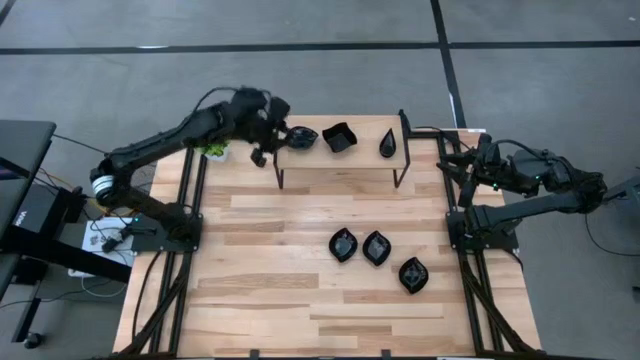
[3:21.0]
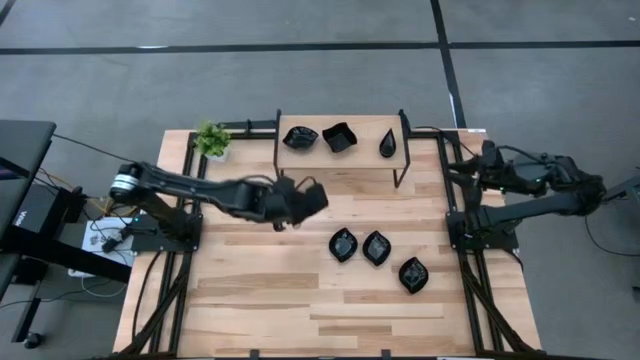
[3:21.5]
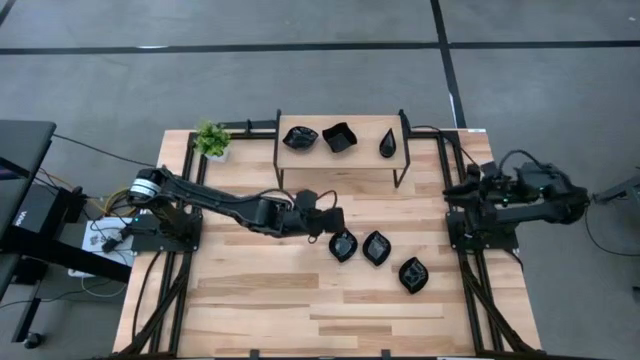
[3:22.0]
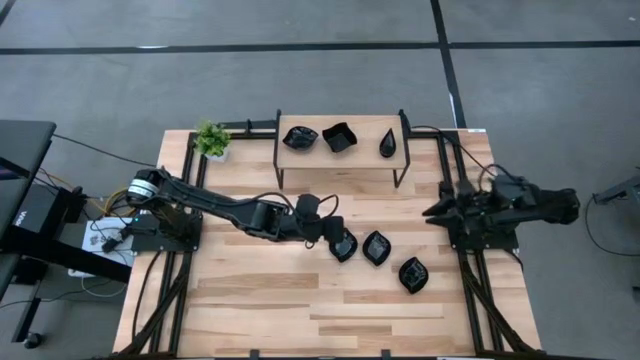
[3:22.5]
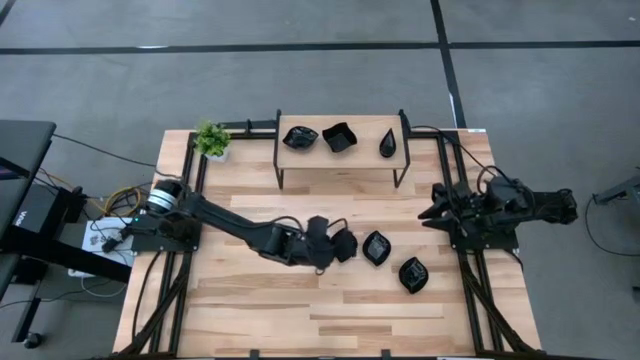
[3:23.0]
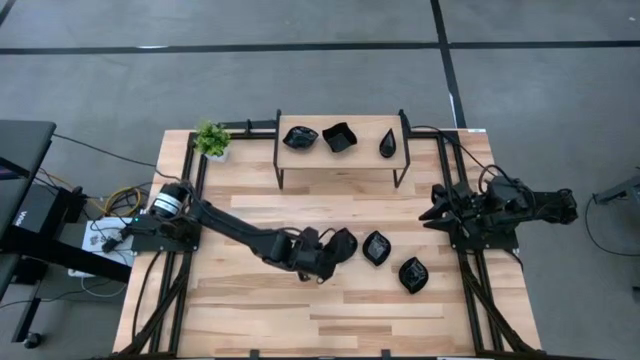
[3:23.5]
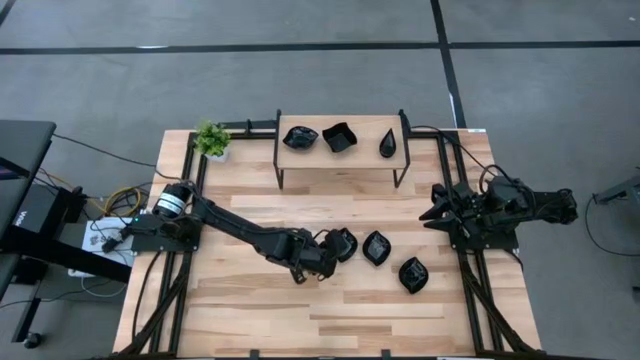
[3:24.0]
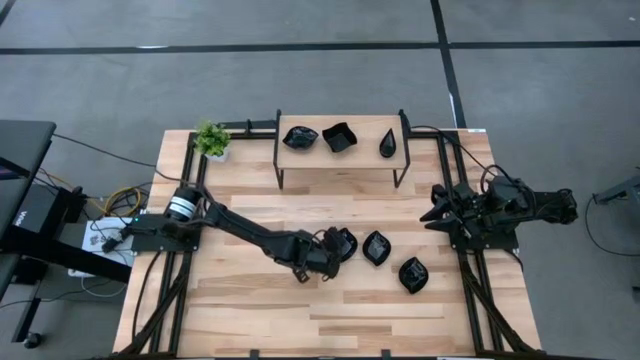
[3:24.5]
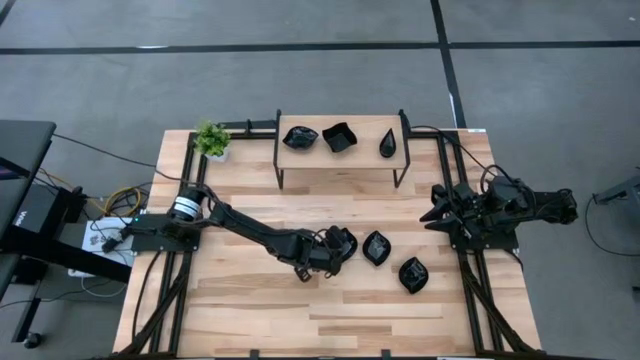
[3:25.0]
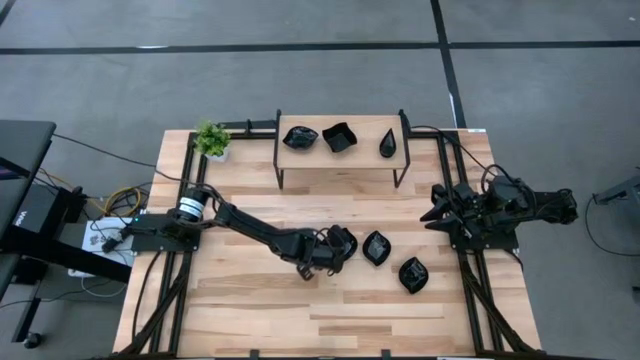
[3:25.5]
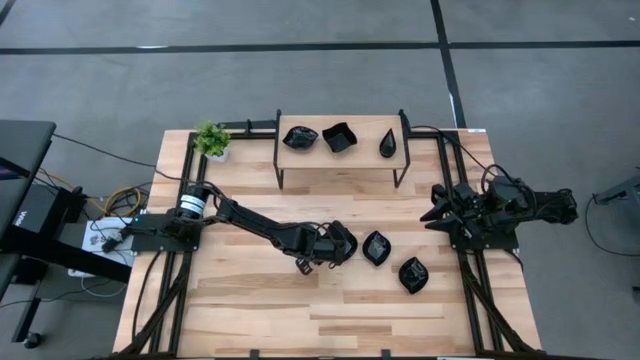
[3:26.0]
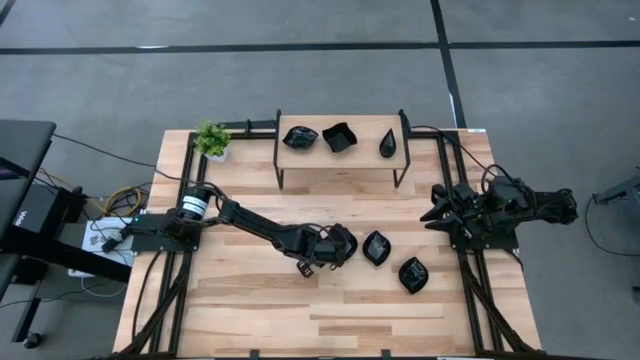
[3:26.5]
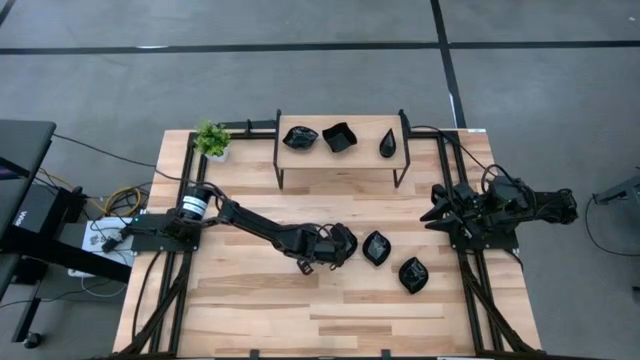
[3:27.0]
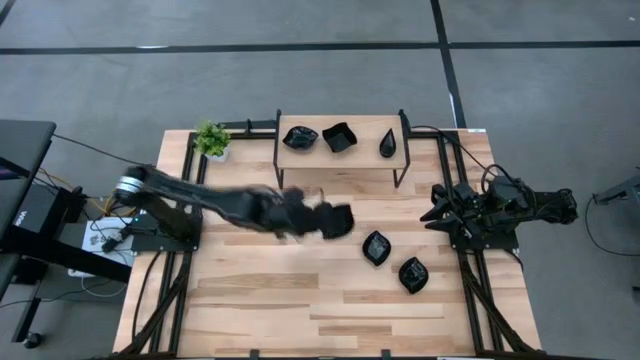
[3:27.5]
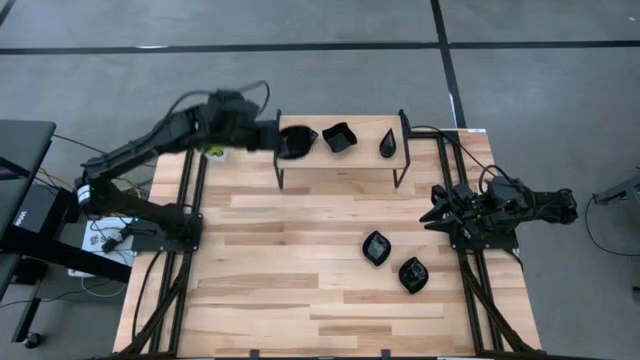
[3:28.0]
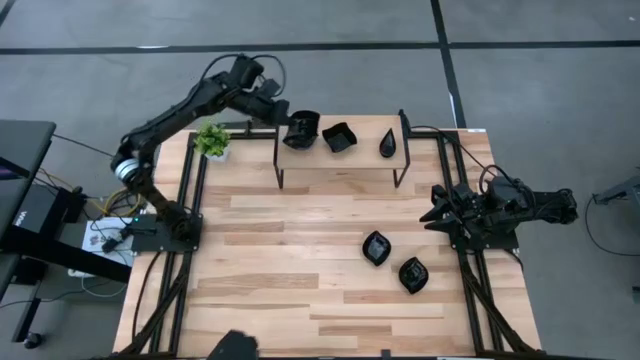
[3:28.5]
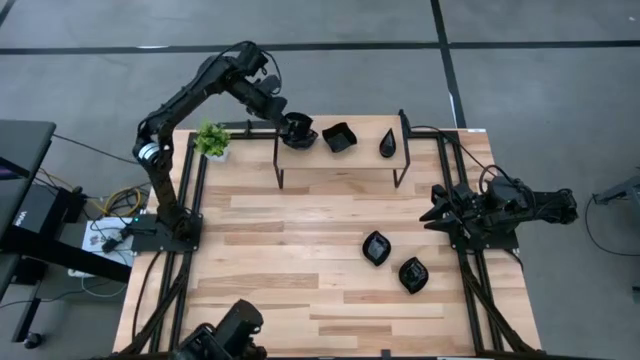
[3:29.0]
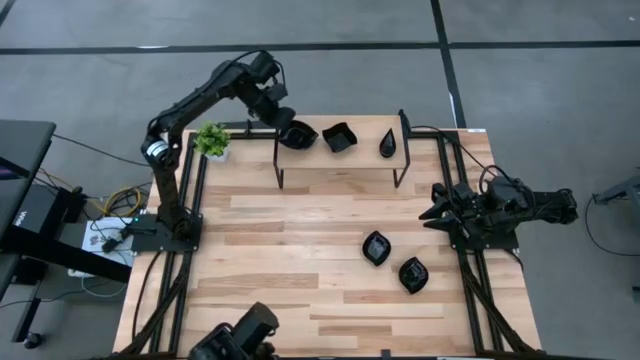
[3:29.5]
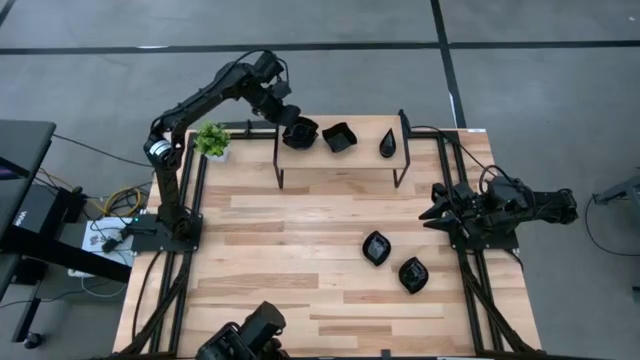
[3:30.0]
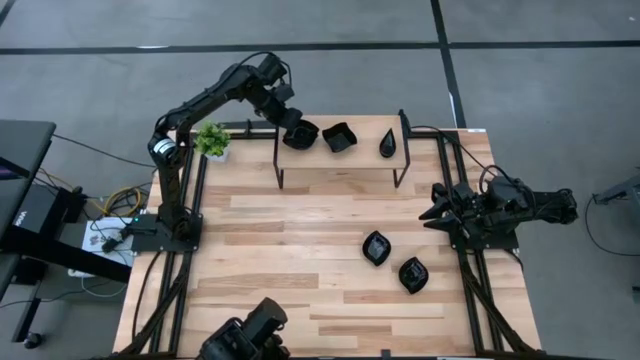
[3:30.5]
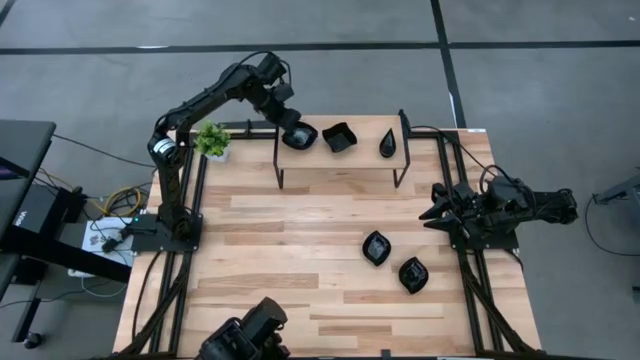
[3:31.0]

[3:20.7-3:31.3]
Task: Pick & Place Mini shaped plates
Stack the black plate on top of the black plate on the shelf

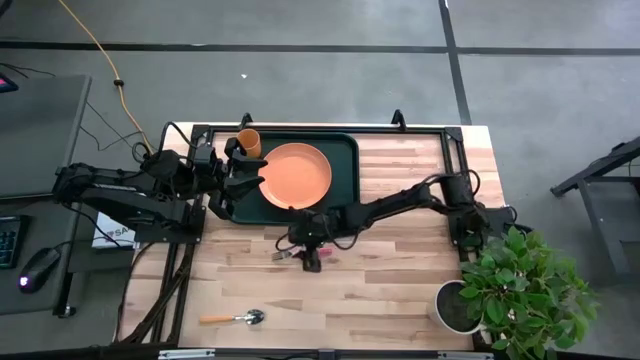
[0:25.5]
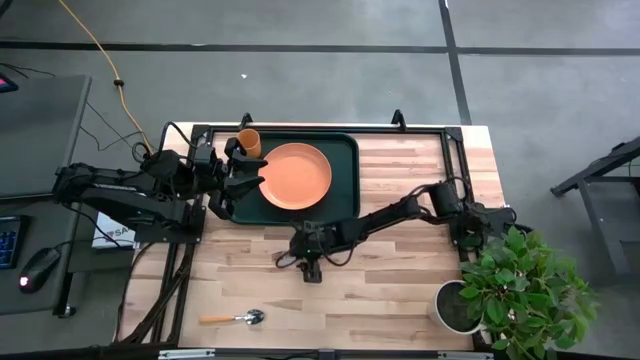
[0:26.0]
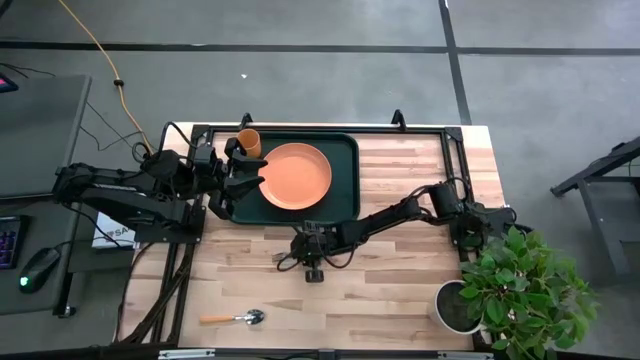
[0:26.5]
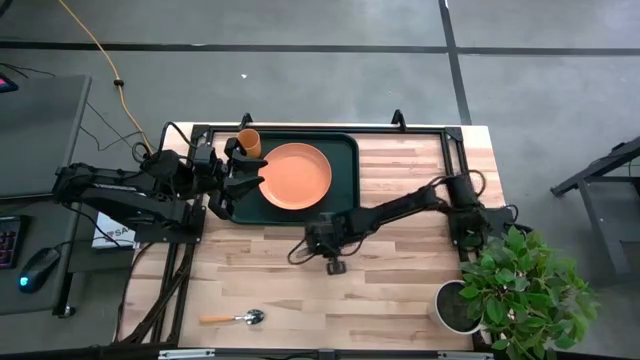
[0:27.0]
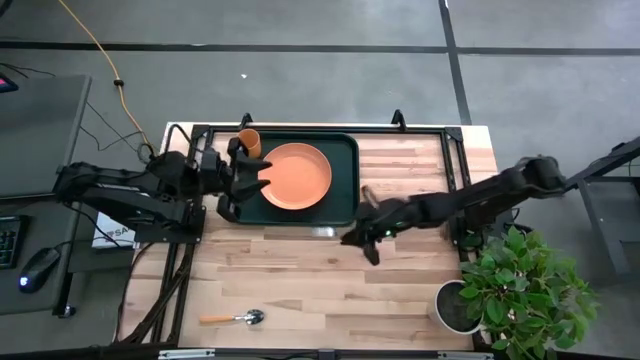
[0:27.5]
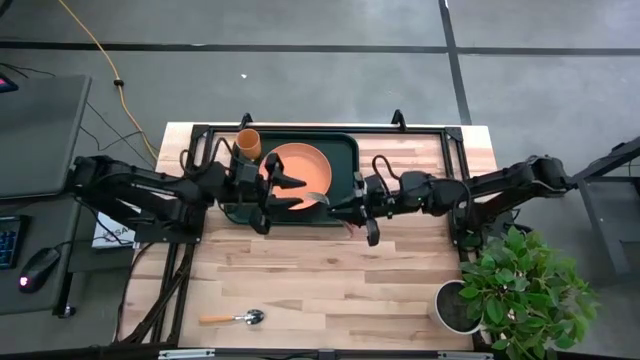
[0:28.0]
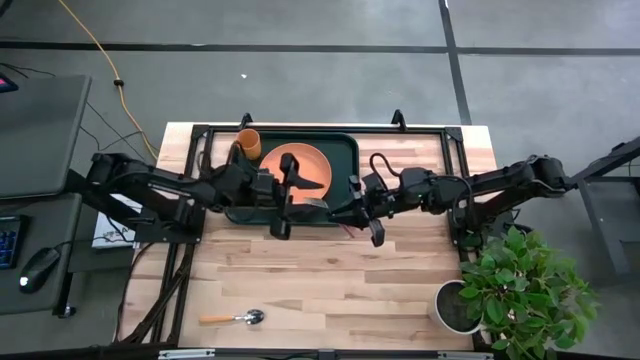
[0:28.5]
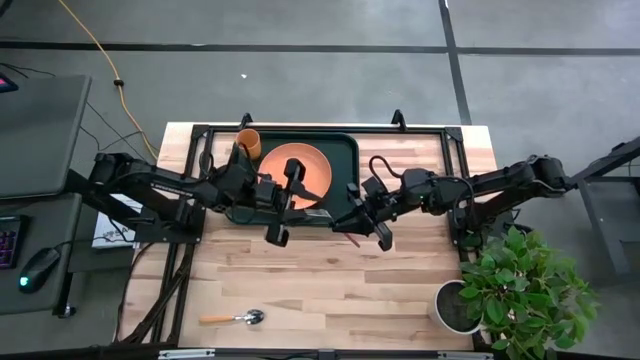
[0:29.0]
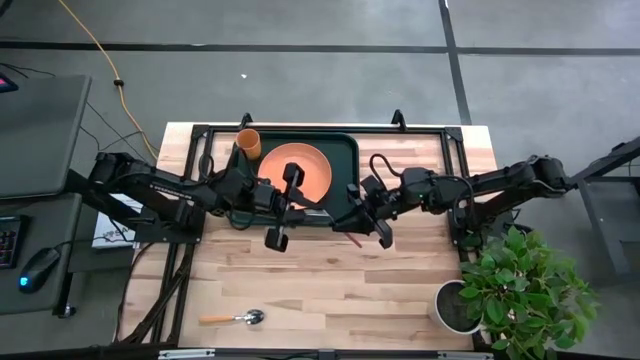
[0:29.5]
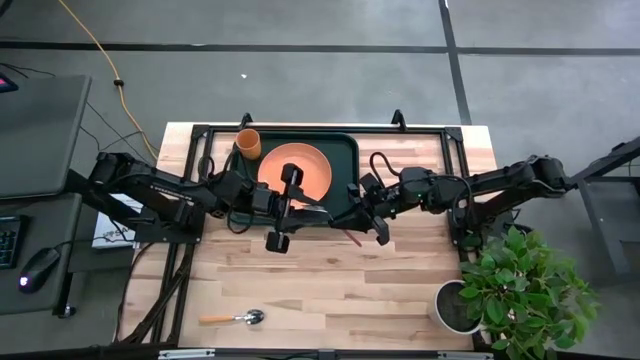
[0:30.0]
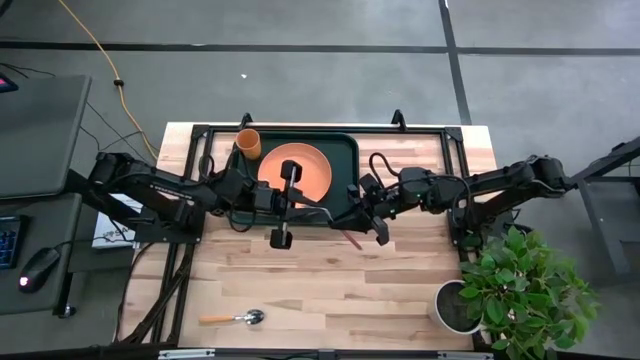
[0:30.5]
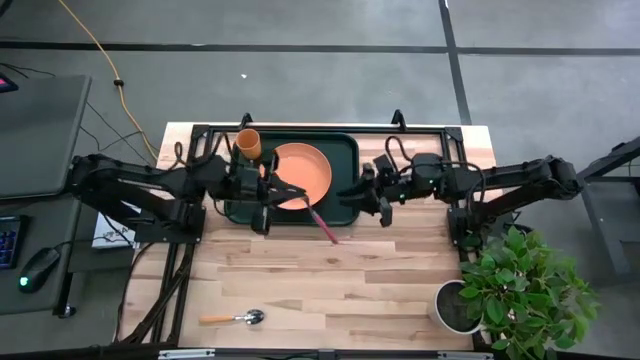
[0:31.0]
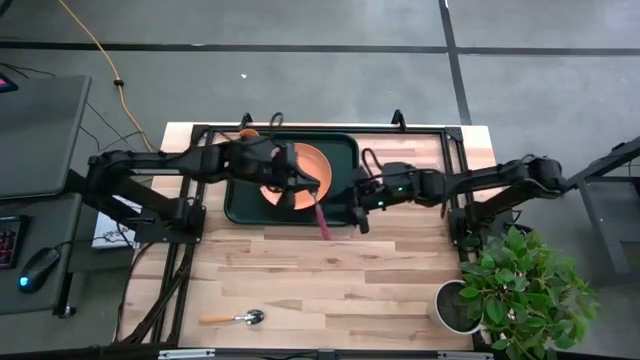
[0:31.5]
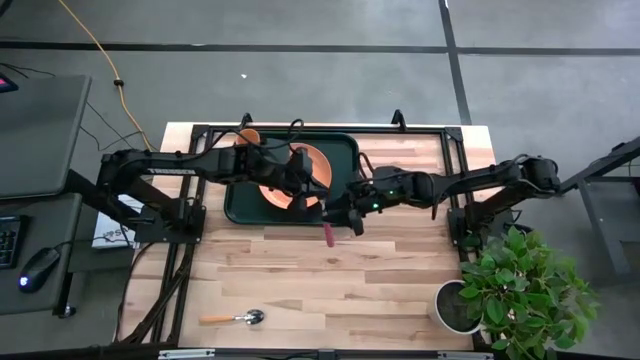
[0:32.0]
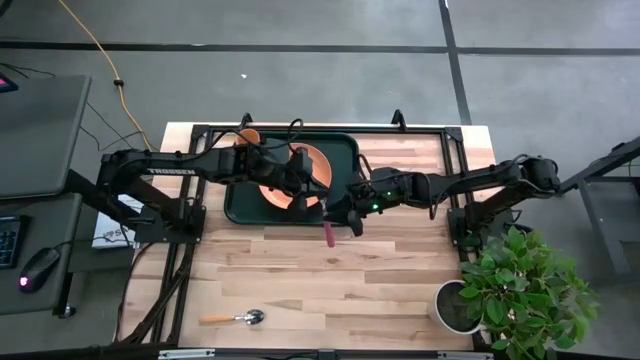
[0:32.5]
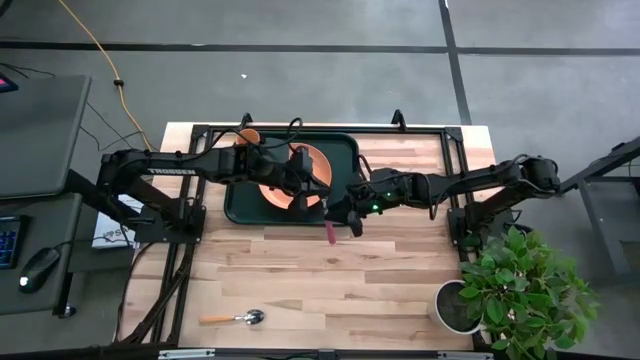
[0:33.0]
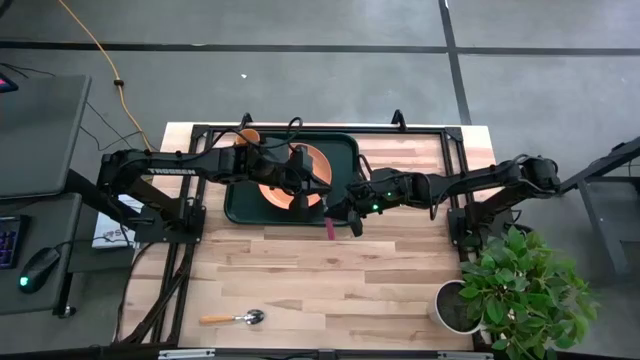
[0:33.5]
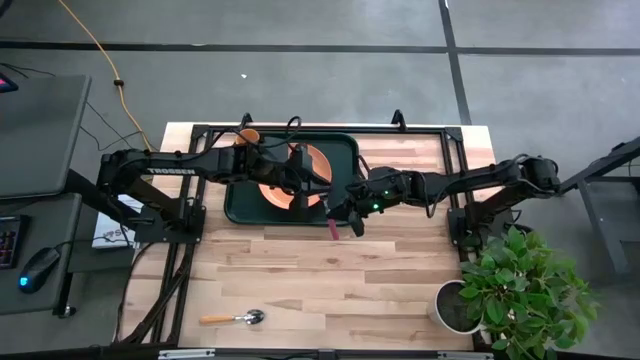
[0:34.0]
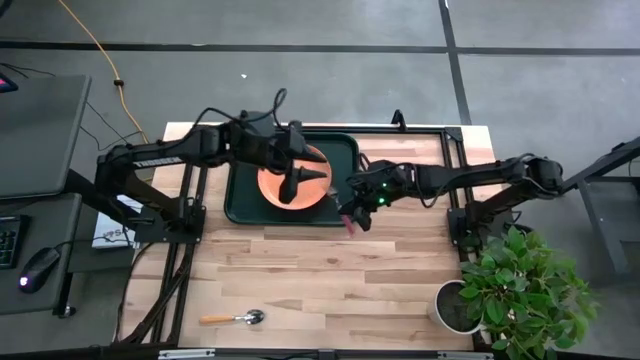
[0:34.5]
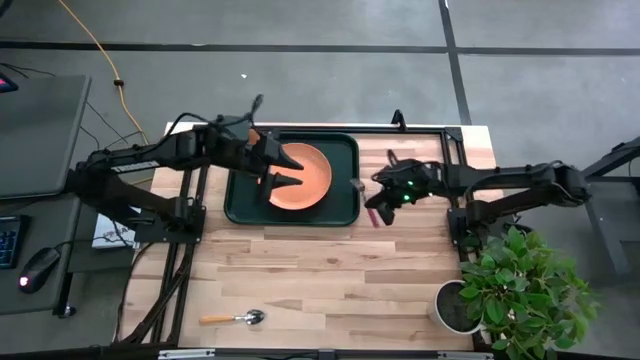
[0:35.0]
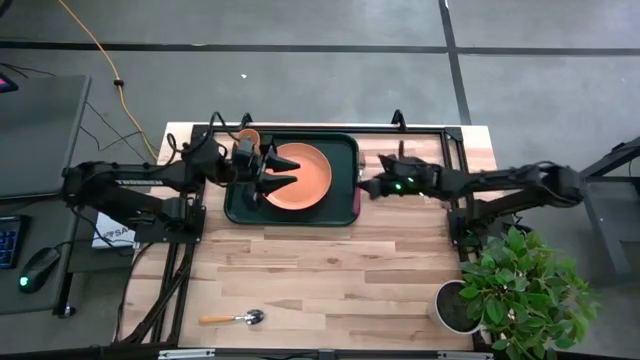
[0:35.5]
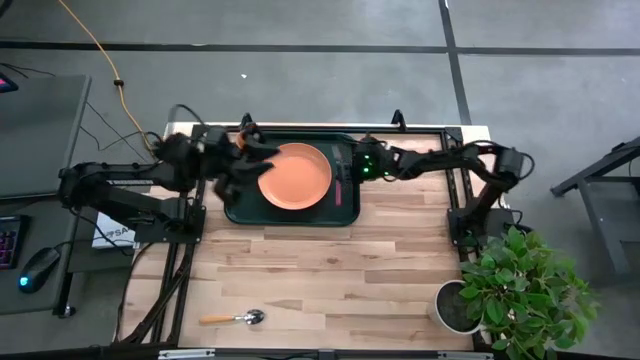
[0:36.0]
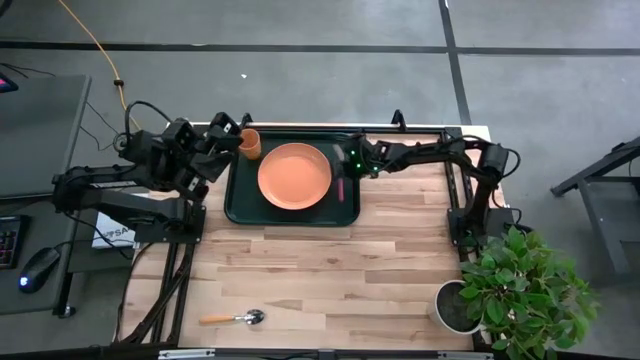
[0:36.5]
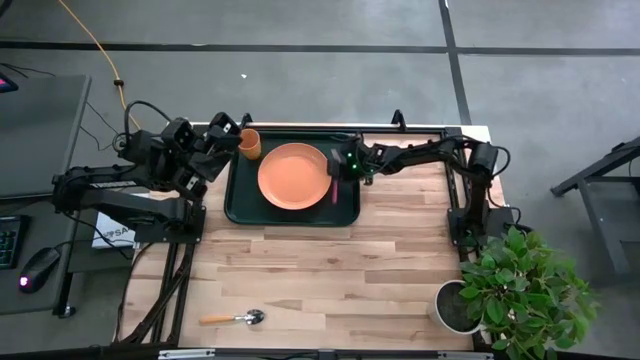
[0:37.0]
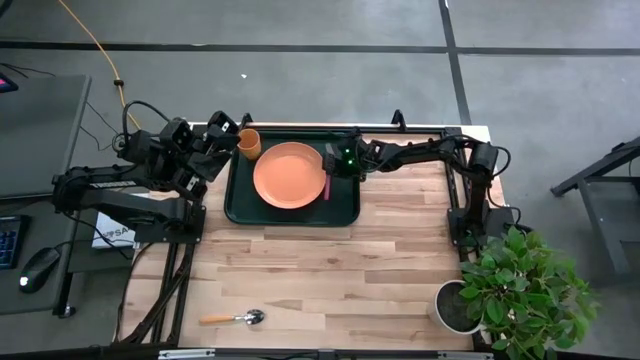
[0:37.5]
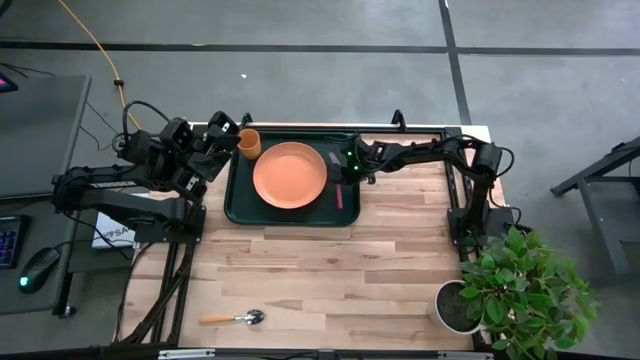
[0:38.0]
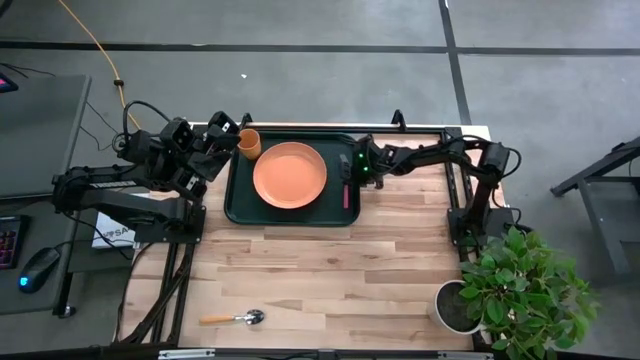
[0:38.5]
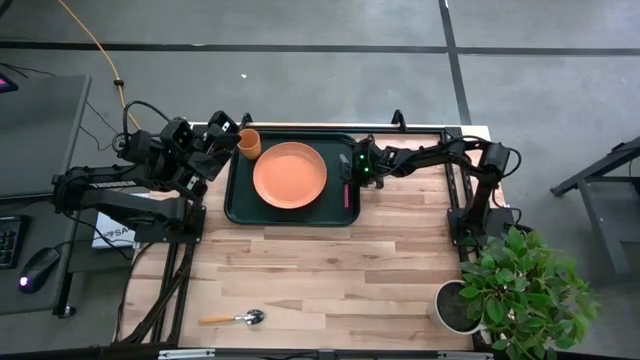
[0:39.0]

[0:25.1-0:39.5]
Task: Pick and place plate/cup/fork/spoon on tray
Put the pink fork on the black serving tray
